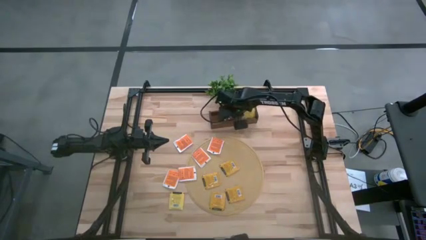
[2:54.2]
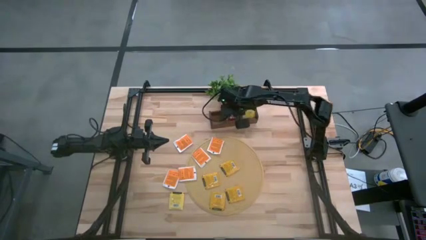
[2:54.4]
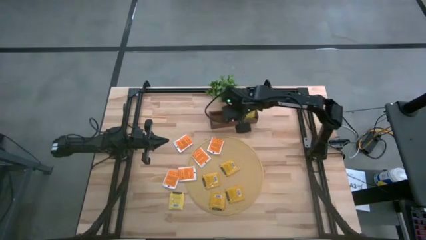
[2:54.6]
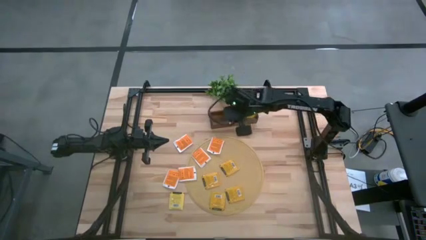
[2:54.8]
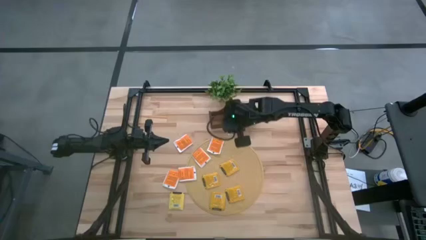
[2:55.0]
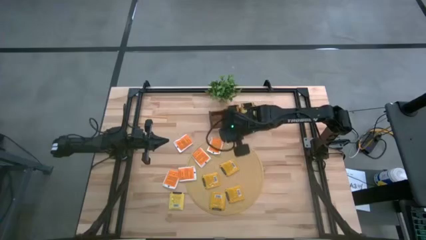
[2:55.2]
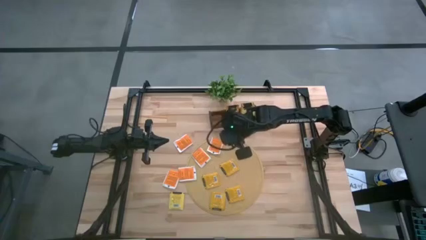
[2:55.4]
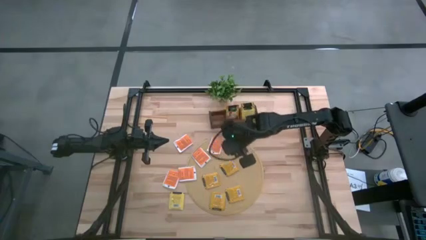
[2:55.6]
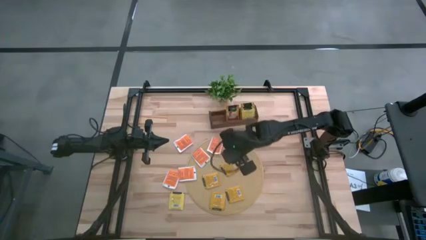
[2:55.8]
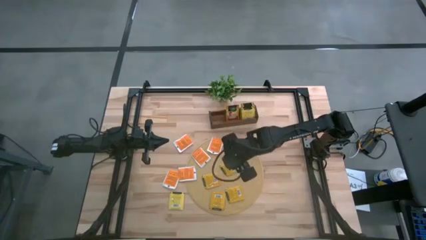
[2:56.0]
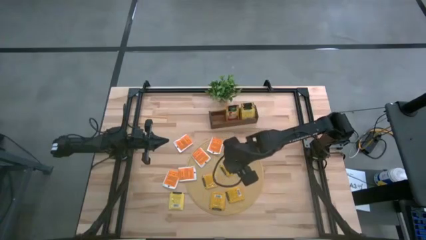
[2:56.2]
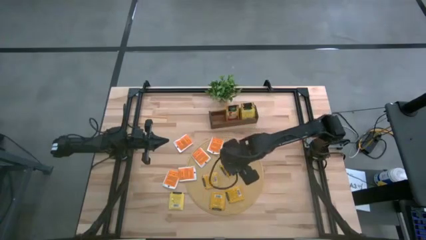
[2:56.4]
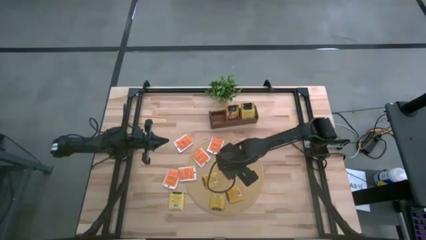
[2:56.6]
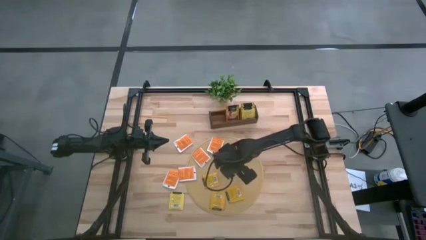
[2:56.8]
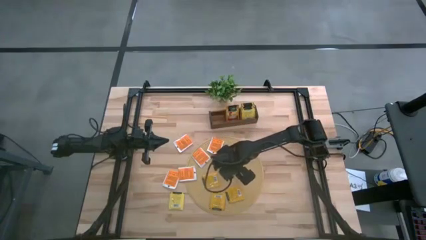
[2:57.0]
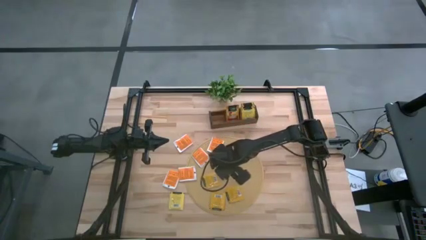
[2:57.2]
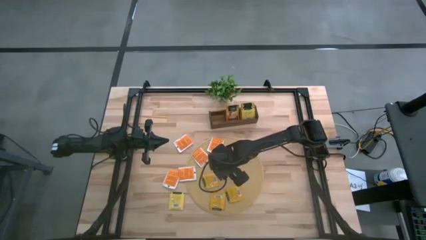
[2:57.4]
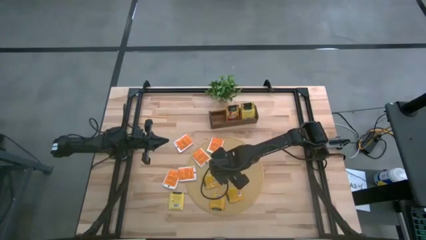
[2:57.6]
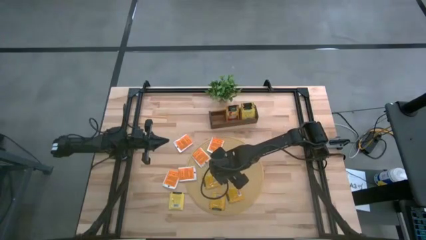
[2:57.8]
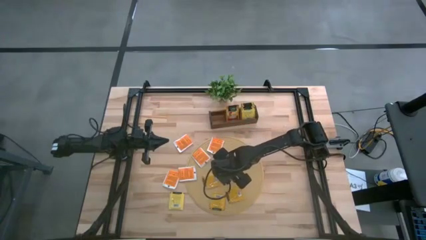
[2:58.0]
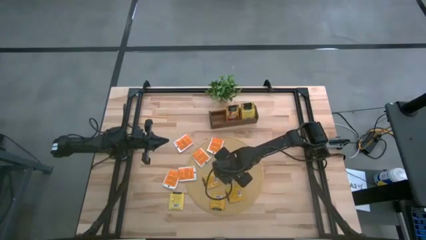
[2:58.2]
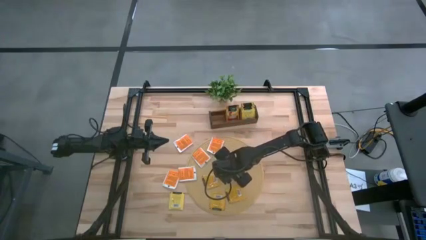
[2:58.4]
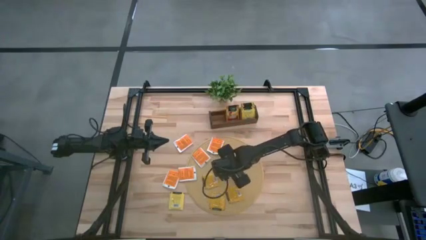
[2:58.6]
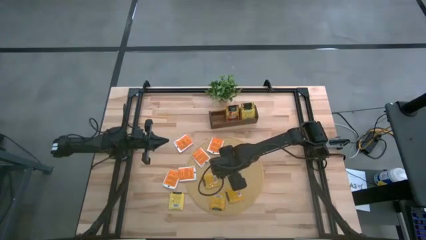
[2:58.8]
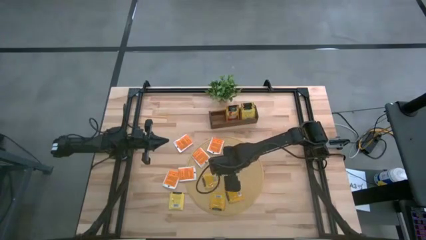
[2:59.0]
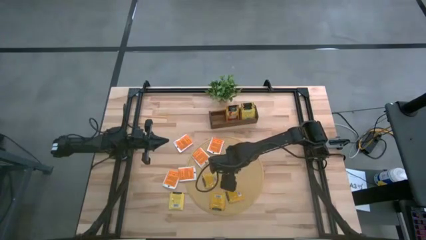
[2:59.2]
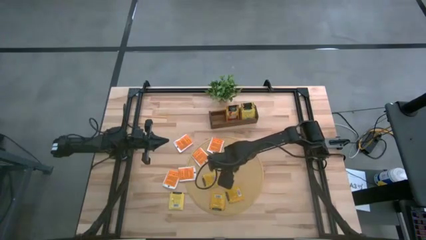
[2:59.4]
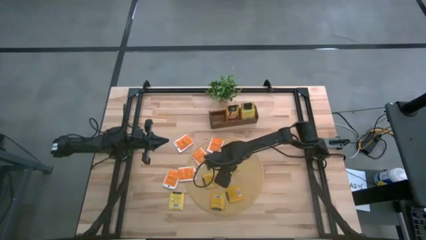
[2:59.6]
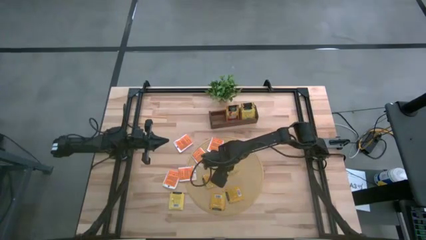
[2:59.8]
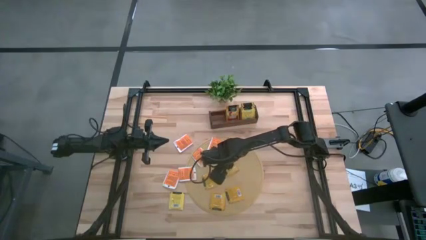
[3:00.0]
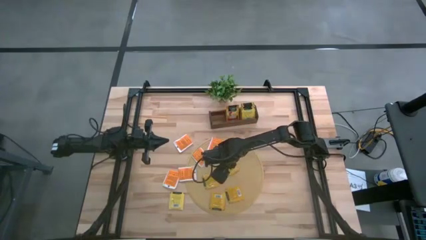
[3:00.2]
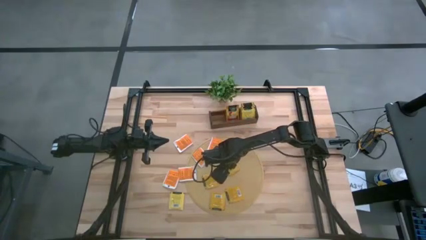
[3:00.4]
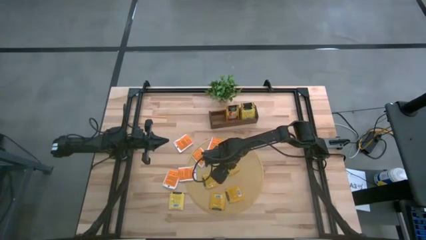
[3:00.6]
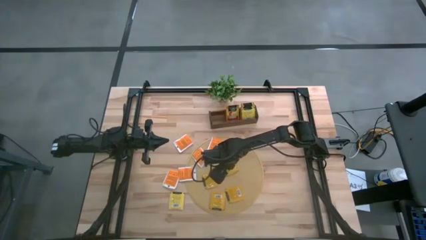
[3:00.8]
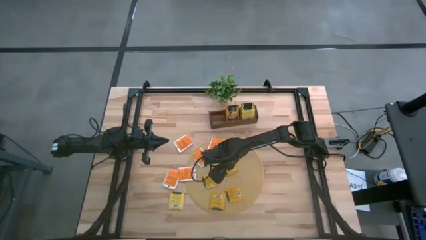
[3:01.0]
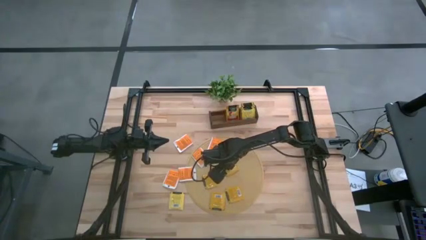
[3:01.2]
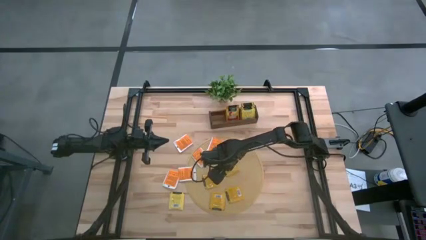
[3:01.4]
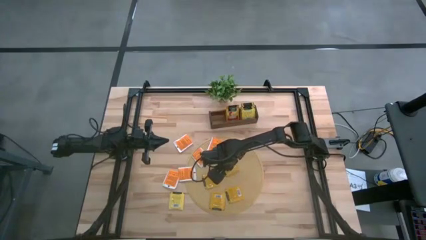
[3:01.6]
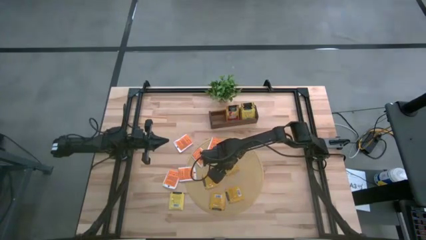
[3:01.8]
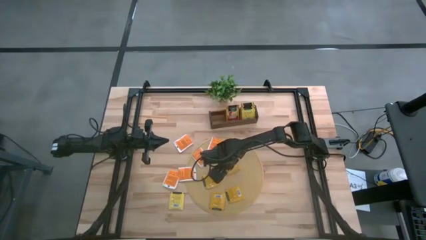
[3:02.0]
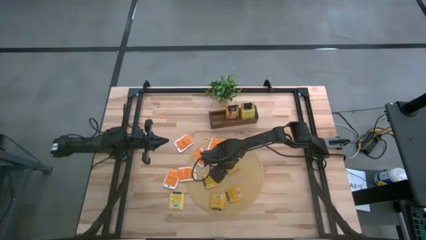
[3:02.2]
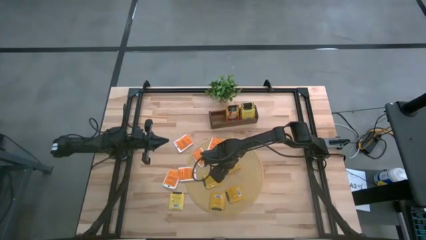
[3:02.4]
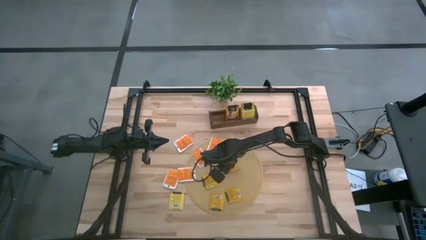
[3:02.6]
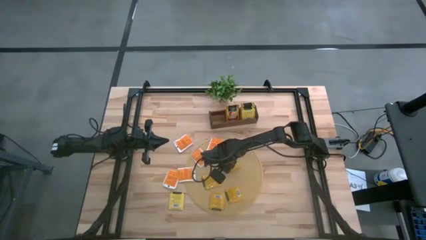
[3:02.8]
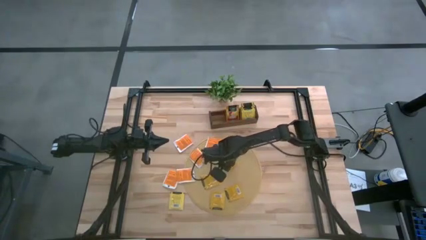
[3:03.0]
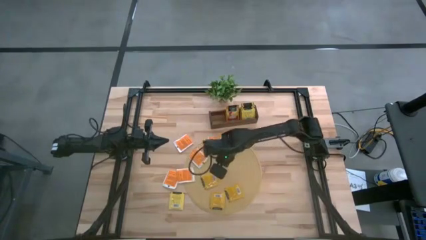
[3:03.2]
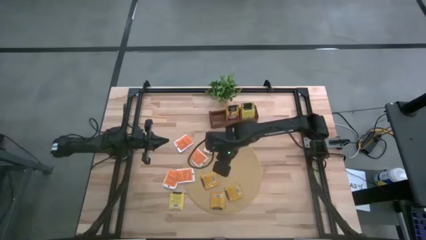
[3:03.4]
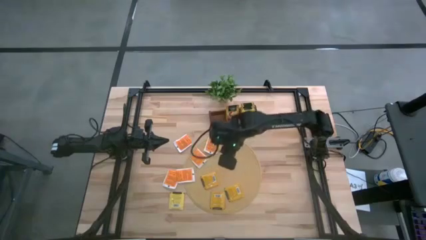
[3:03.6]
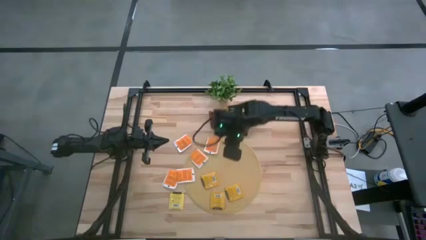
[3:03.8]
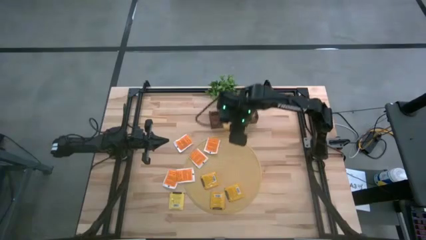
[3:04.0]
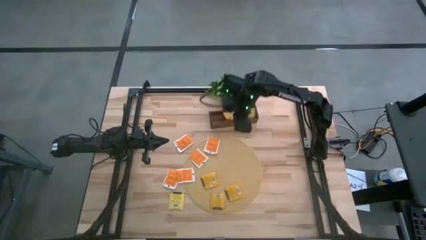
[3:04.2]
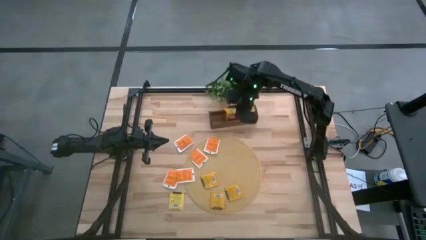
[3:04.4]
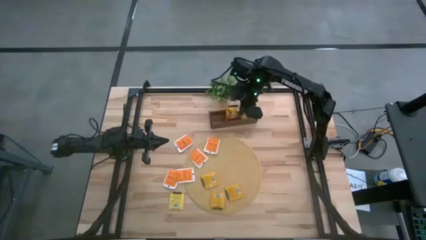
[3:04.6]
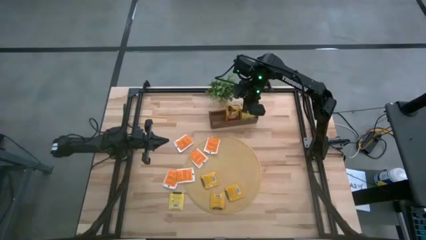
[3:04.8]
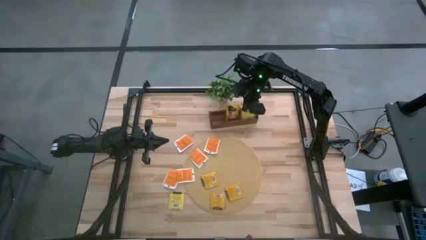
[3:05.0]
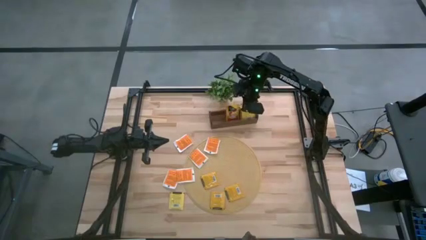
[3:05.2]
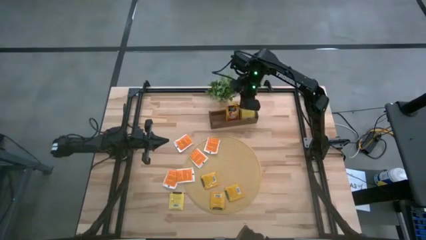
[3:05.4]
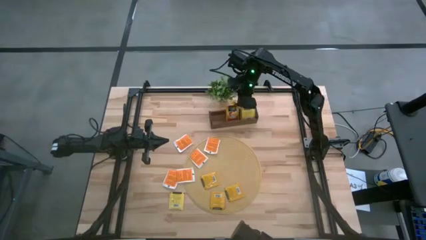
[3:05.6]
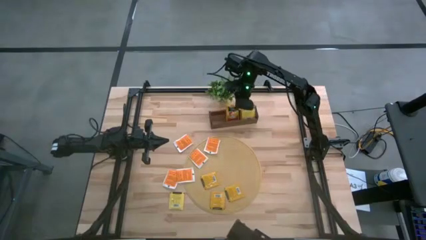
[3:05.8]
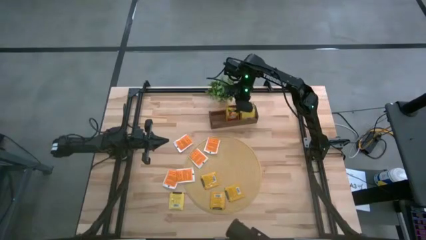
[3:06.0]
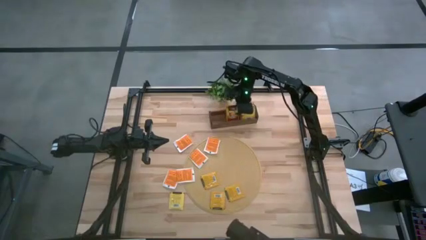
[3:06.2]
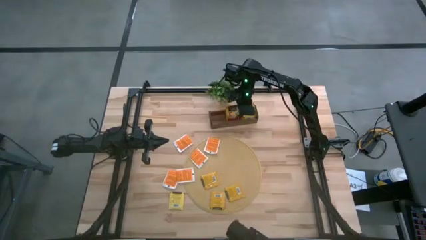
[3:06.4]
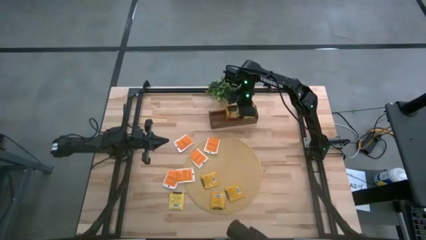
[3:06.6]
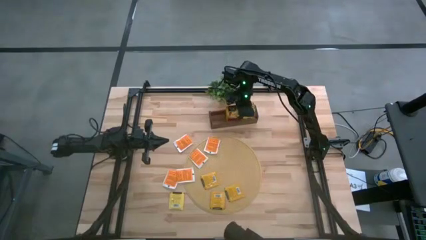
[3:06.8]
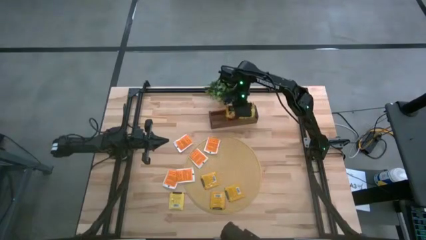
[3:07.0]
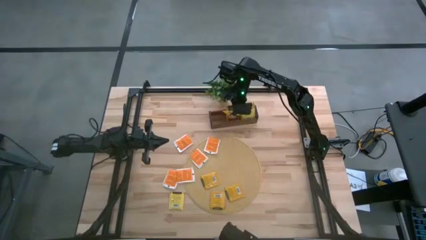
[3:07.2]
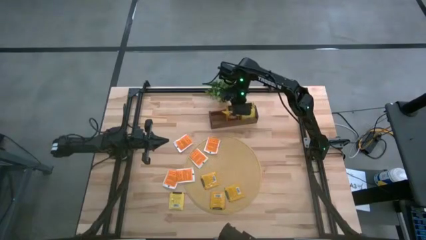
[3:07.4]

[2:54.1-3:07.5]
Task: Pick & Place Tea
Put the orange tea bag into the middle section of the wooden organizer

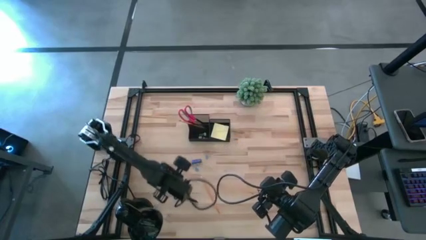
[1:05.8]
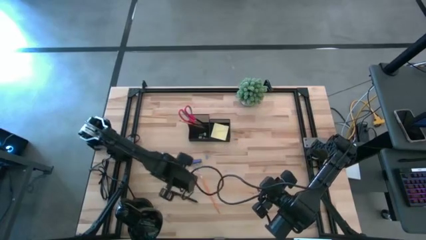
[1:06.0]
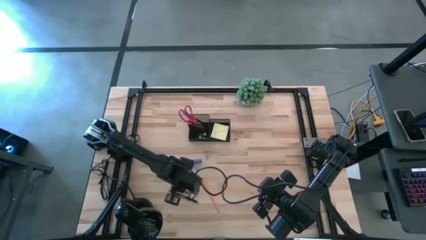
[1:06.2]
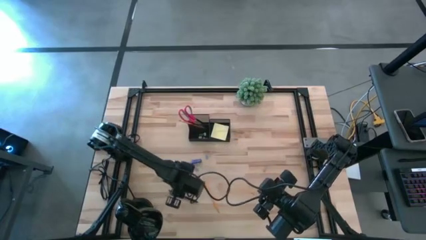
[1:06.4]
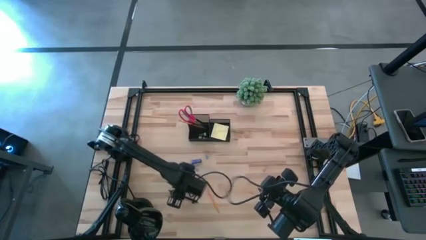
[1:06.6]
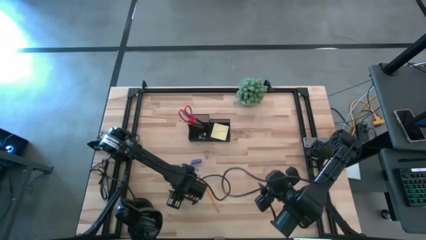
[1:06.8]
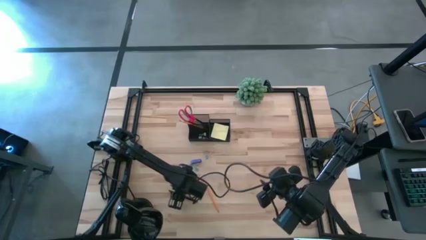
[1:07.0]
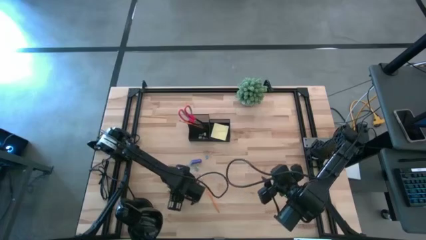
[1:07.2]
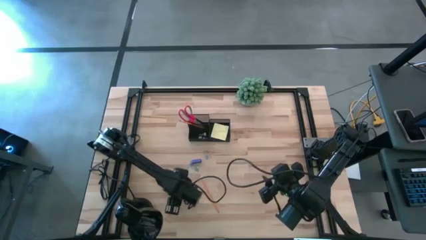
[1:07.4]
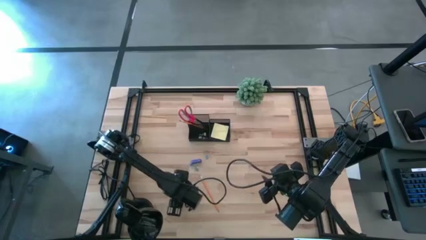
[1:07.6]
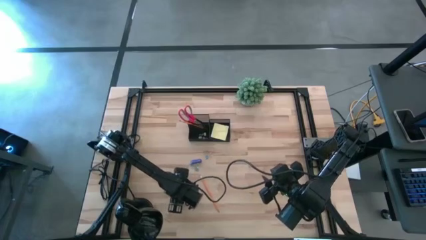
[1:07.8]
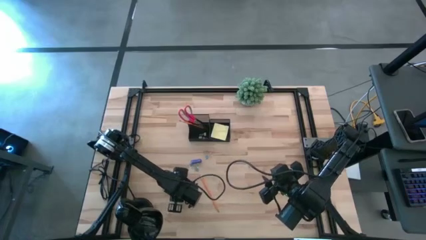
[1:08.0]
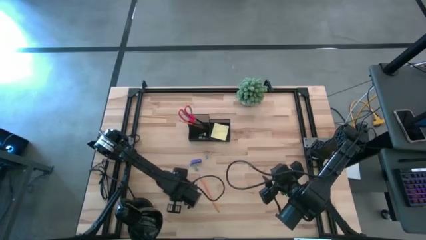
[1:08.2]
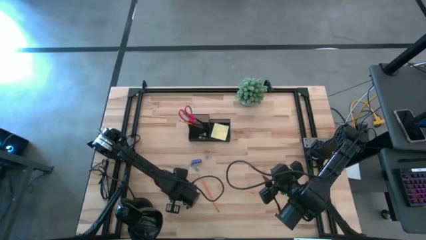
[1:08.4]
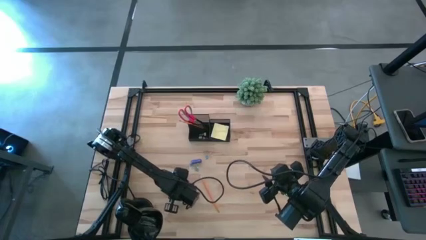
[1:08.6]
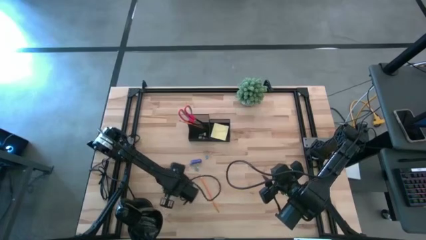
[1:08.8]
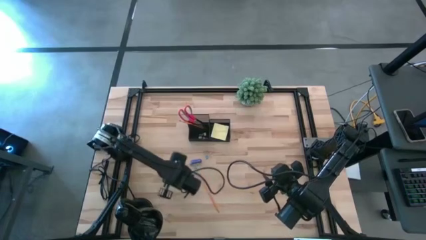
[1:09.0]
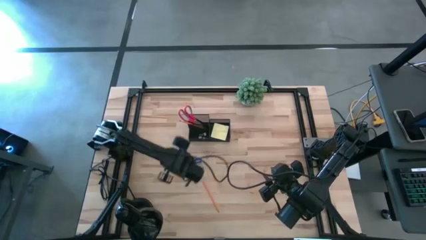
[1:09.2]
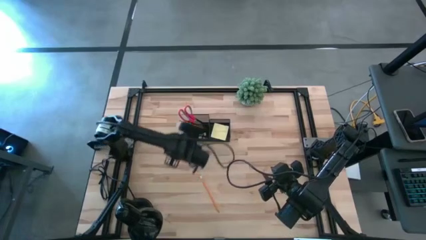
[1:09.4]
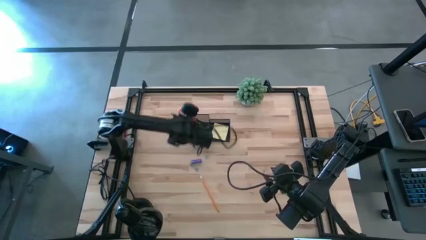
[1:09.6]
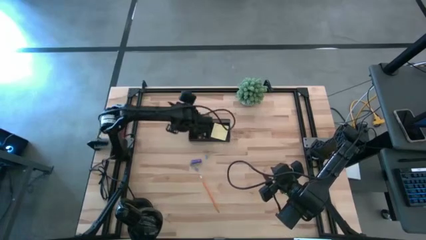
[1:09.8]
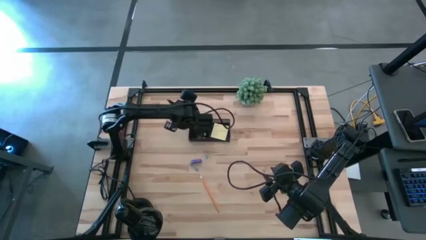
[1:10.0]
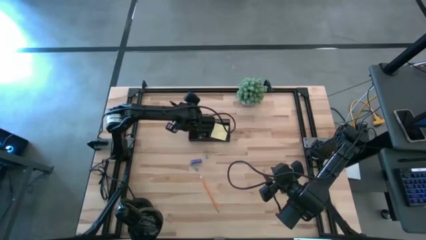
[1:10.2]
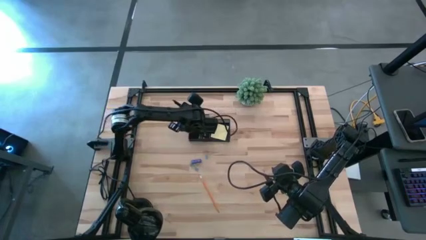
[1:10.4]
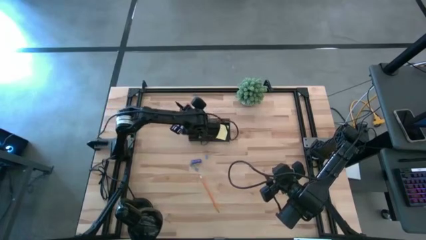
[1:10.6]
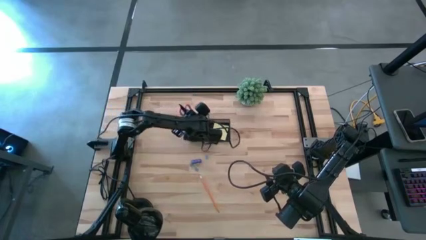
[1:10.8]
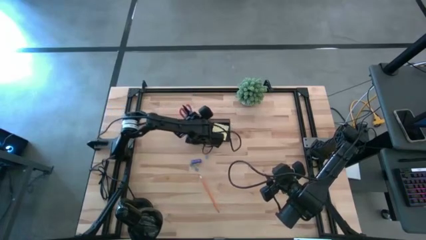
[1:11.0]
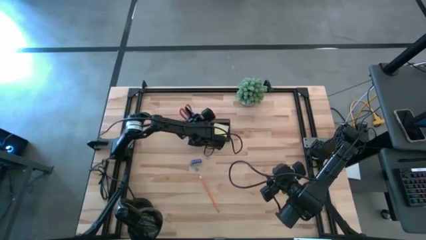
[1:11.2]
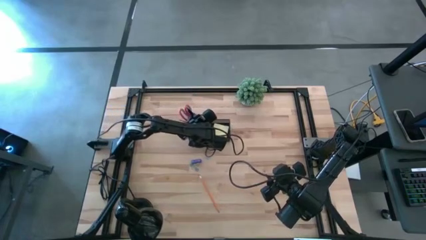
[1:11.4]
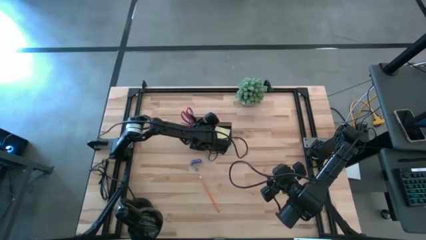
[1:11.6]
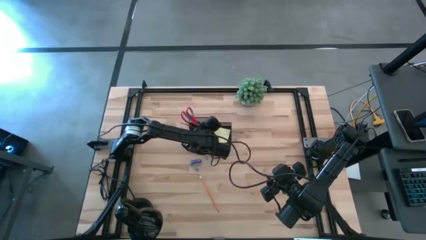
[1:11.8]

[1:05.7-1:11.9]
Task: Pick and place office supplies into organizer
Put the black pen into the desk organizer
